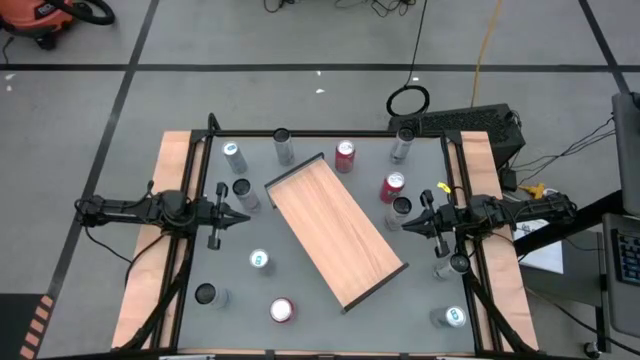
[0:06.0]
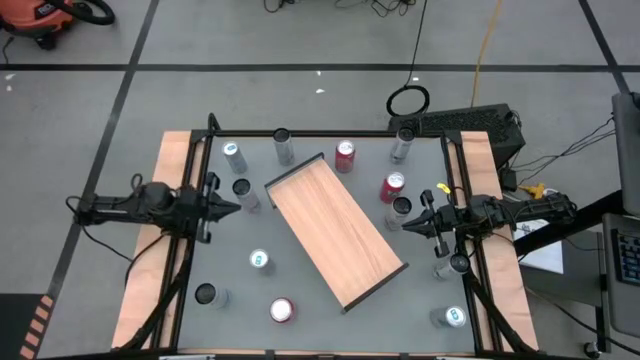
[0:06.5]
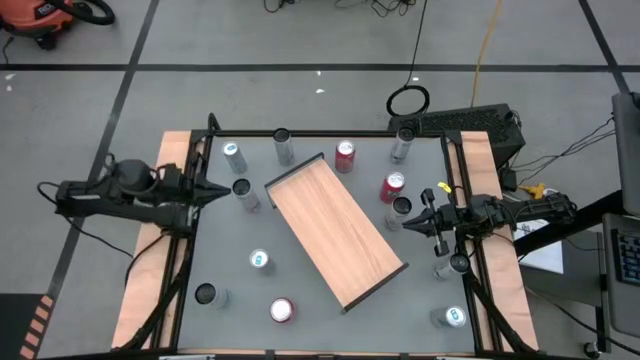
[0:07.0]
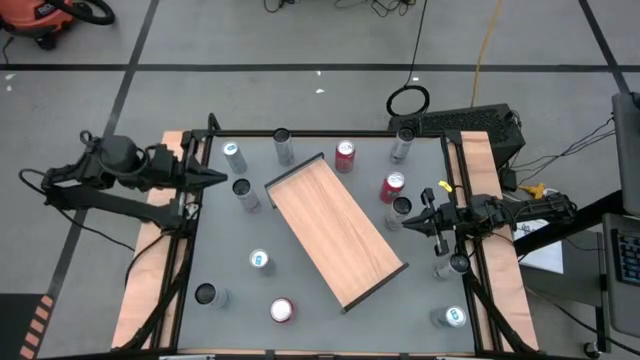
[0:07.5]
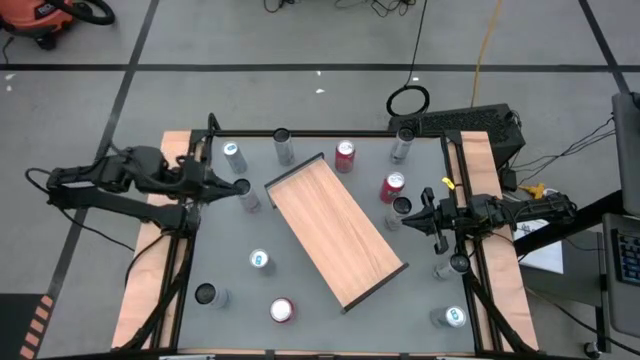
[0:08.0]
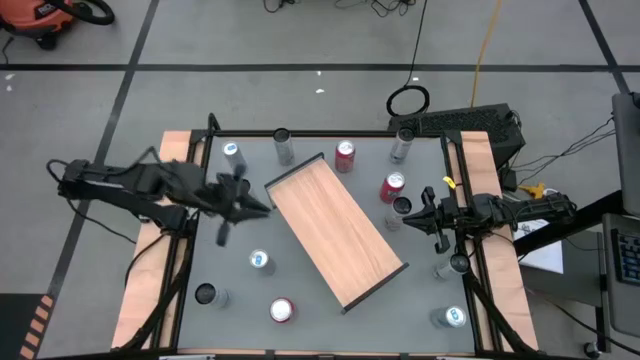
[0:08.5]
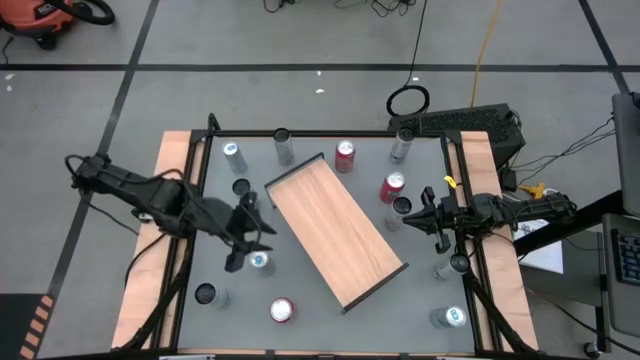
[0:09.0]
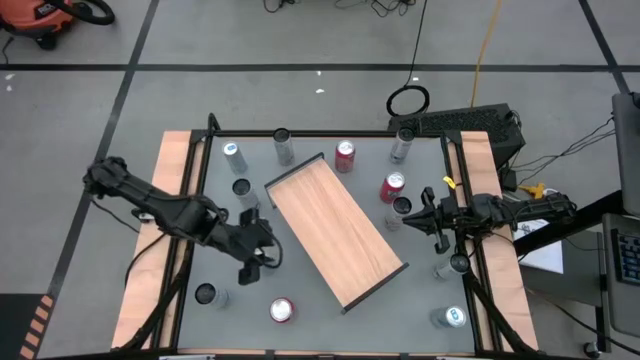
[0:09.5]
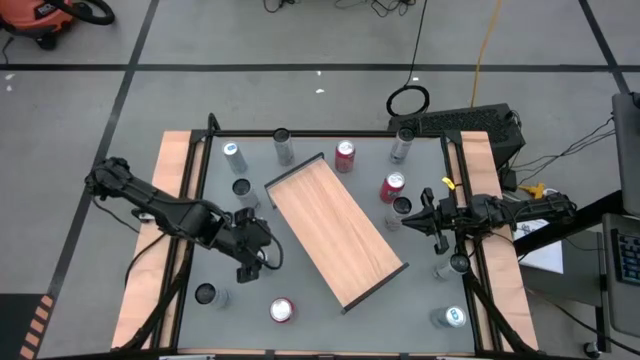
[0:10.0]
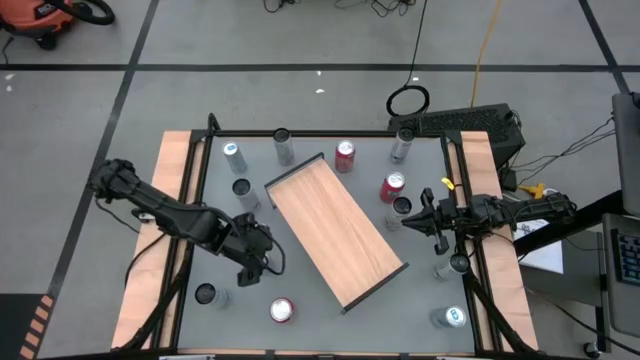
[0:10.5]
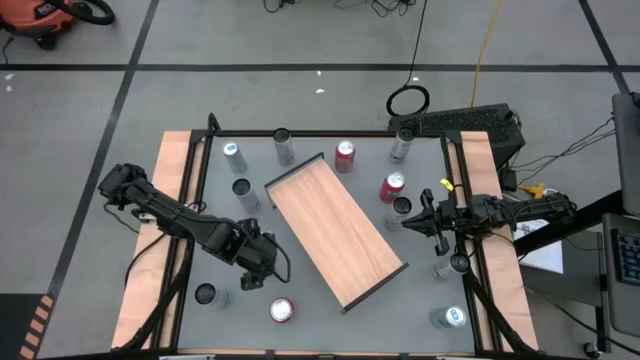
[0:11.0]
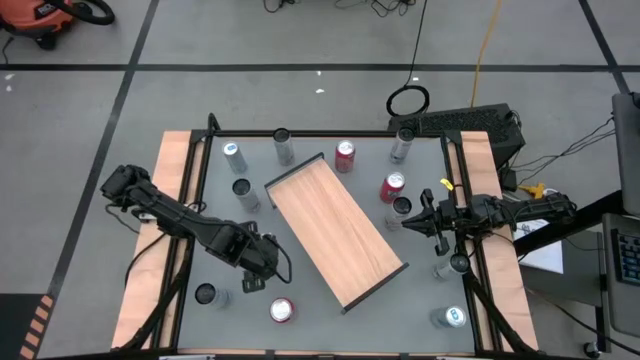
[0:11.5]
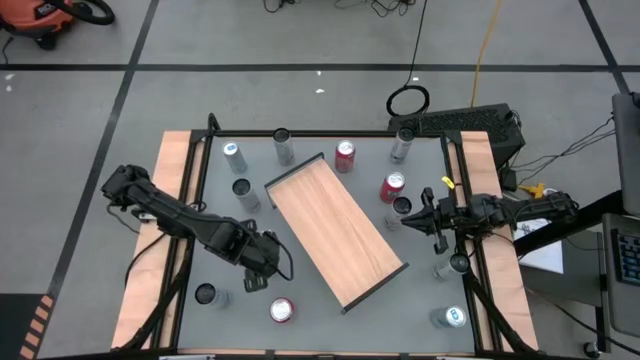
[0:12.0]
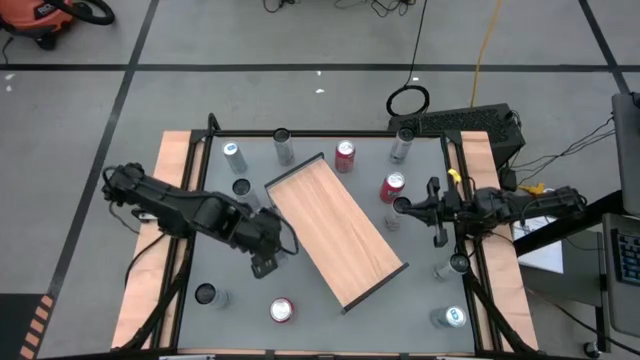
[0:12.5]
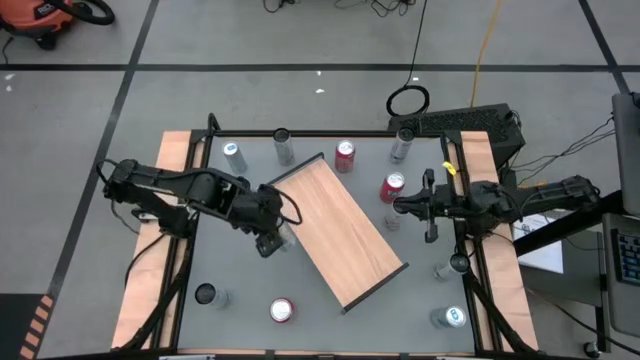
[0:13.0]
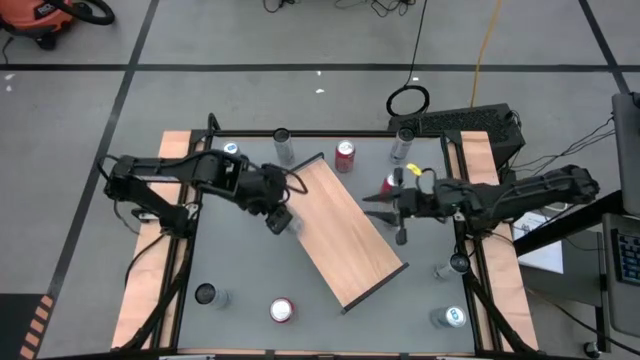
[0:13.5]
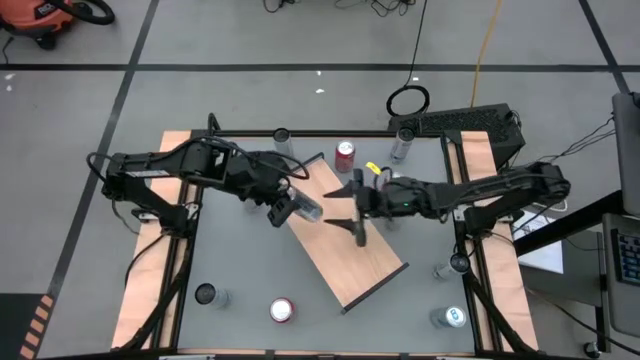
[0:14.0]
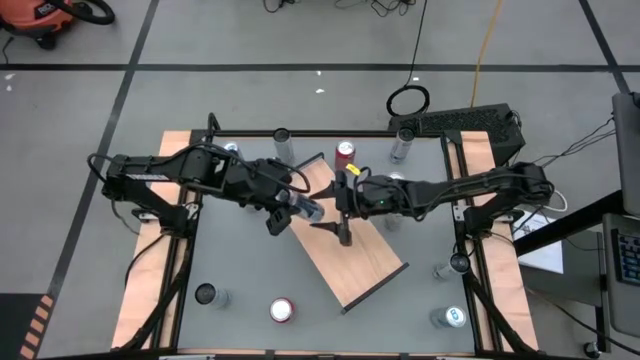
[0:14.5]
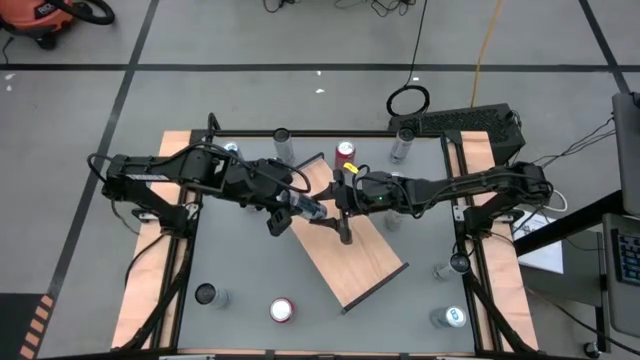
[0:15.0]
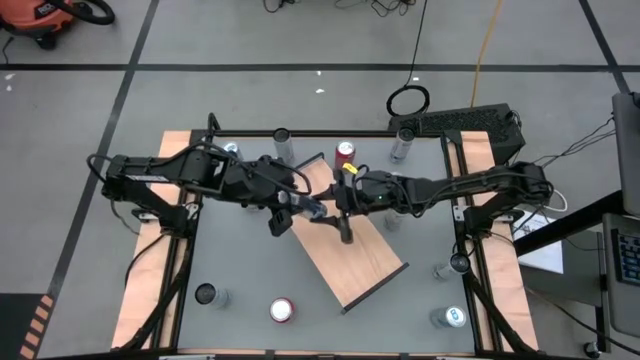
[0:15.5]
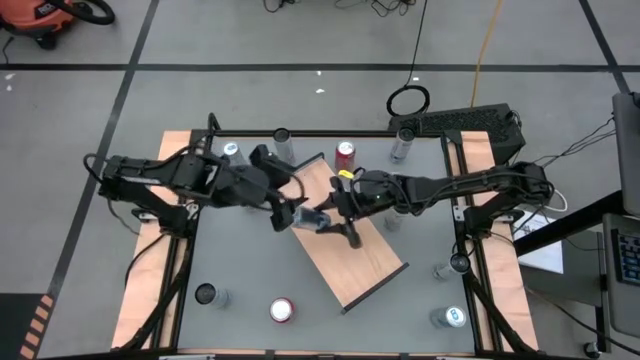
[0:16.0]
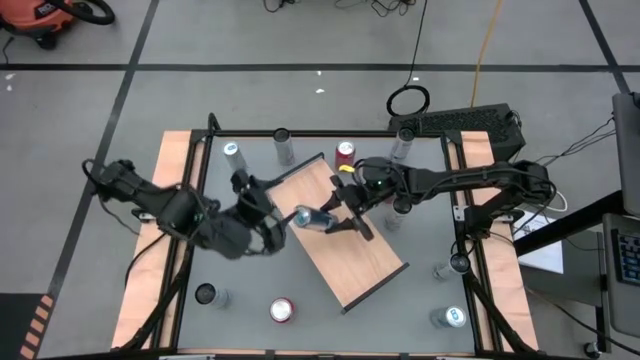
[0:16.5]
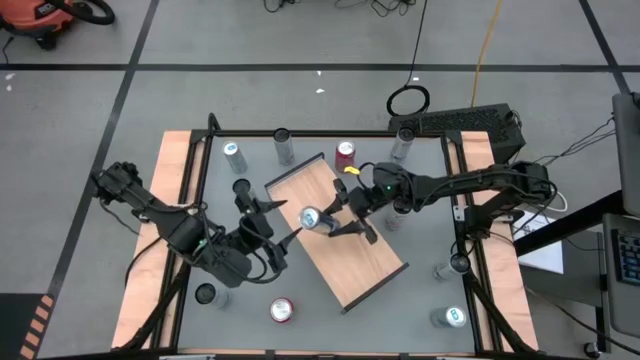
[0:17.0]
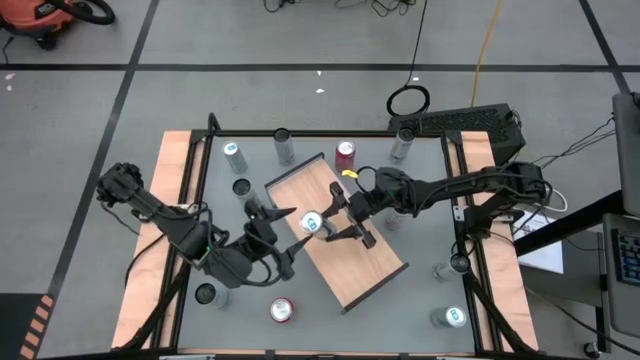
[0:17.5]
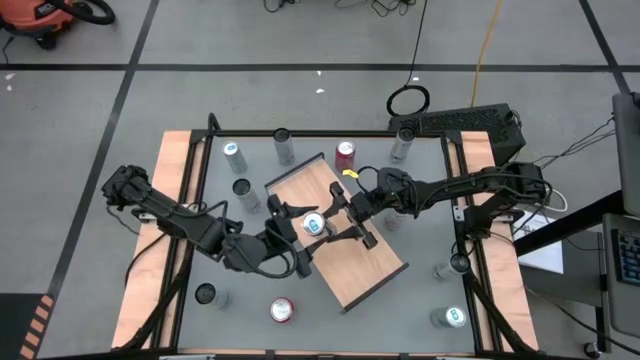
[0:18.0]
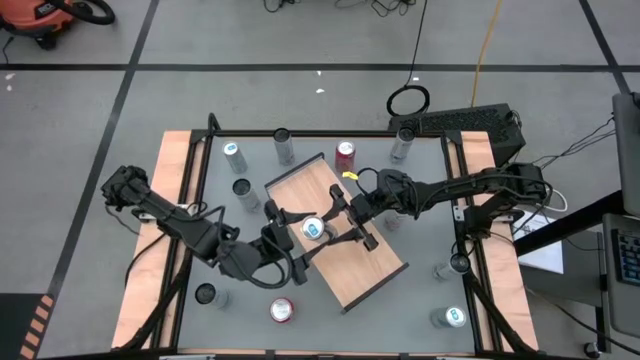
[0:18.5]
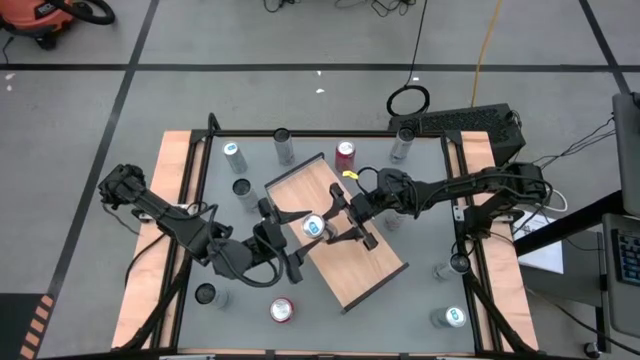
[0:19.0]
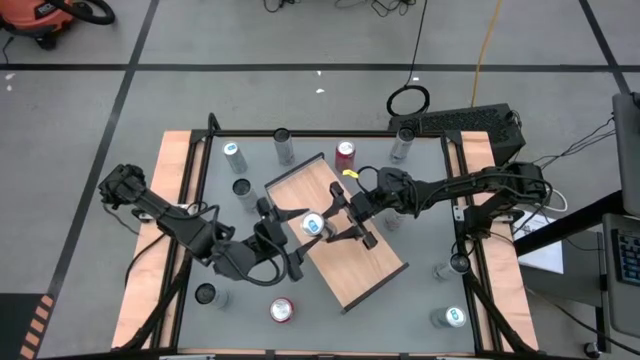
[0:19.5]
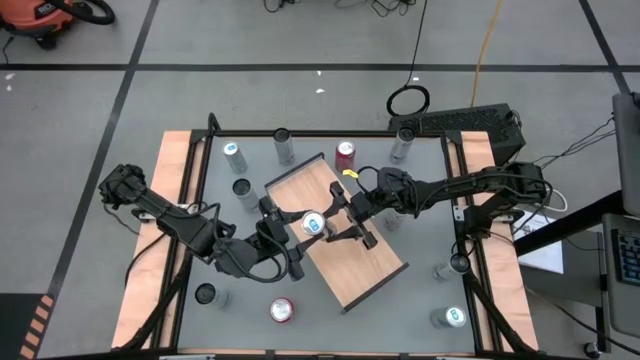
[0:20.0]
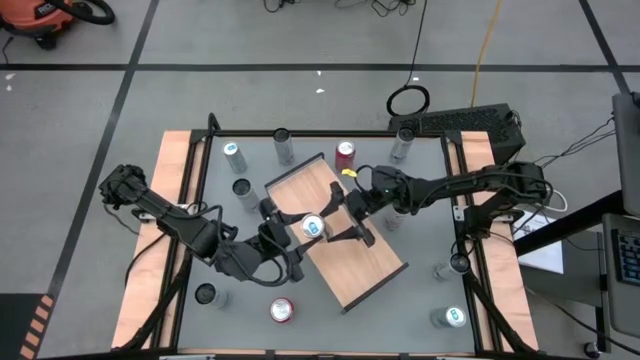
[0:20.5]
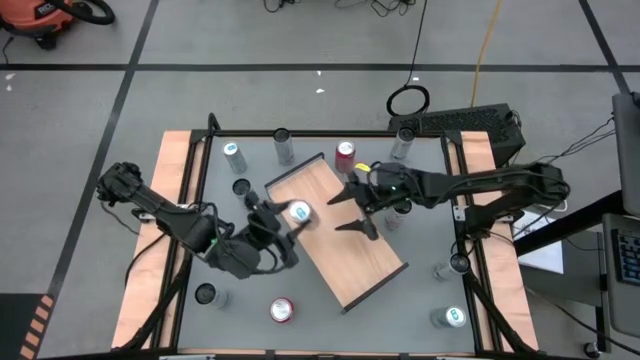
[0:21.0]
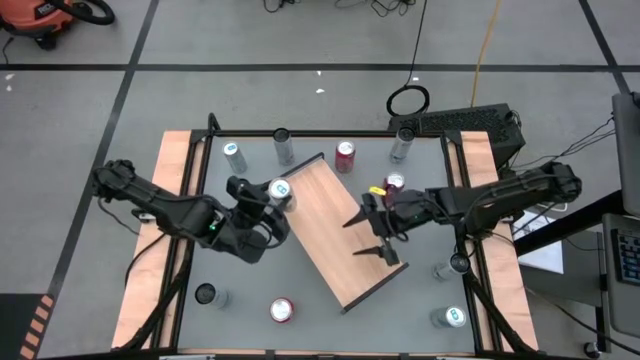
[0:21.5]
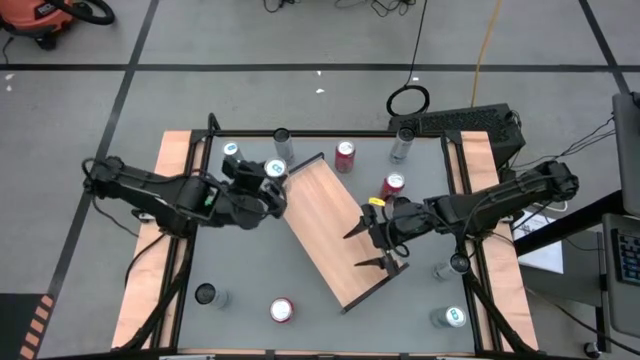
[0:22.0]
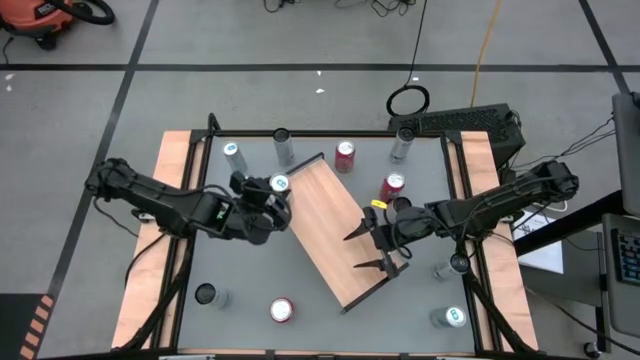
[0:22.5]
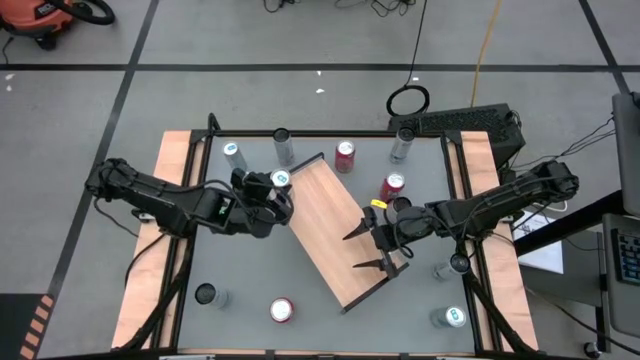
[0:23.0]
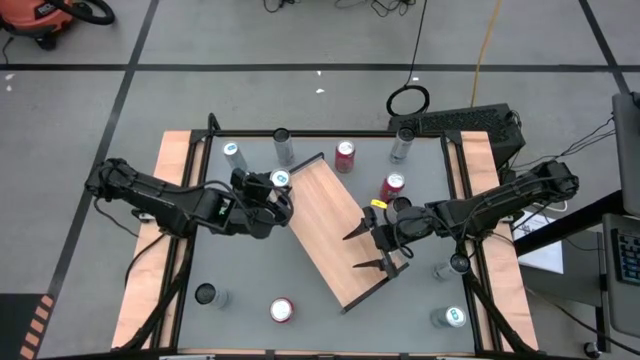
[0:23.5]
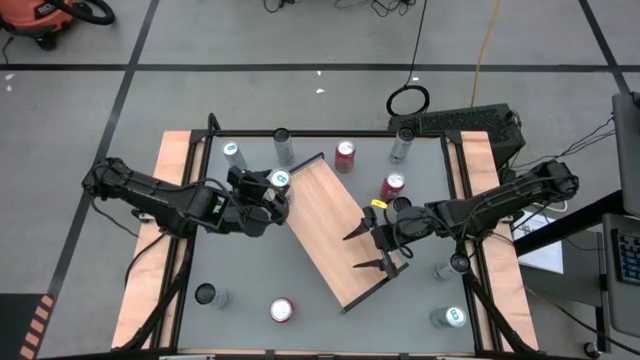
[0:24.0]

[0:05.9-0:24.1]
Task: Place canned beverage on shelf
Put the bottom left silver soda can on the shelf
